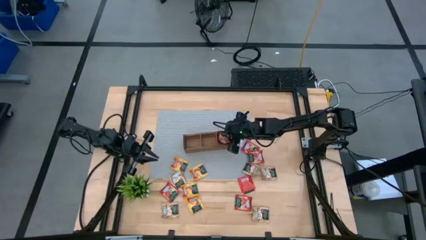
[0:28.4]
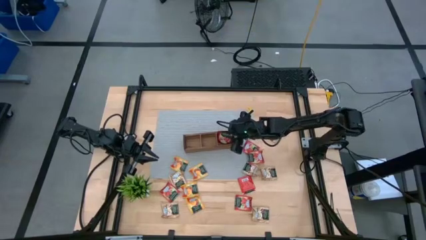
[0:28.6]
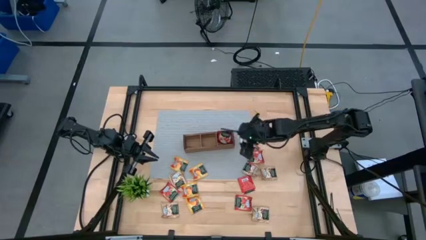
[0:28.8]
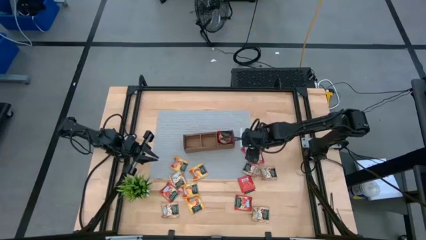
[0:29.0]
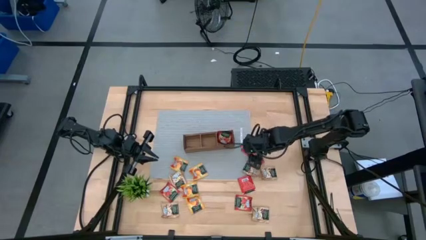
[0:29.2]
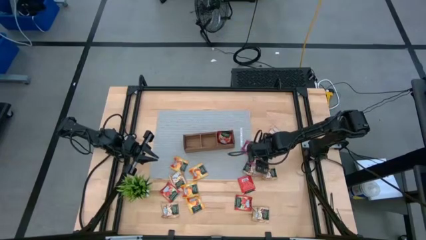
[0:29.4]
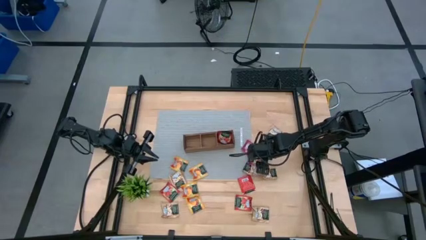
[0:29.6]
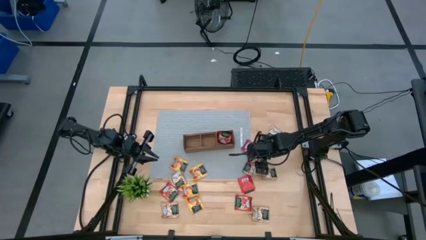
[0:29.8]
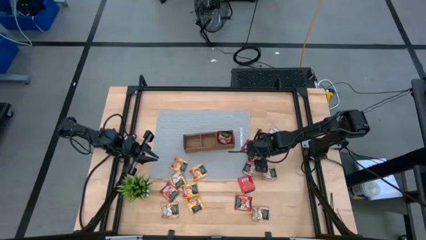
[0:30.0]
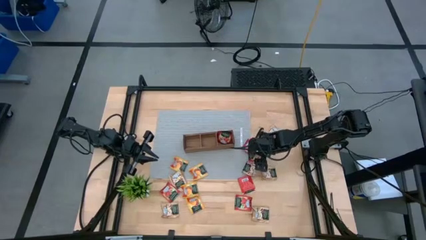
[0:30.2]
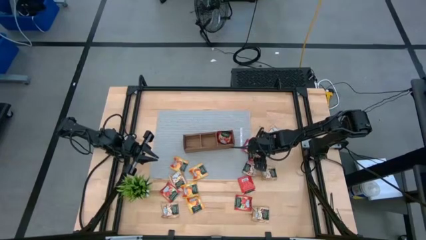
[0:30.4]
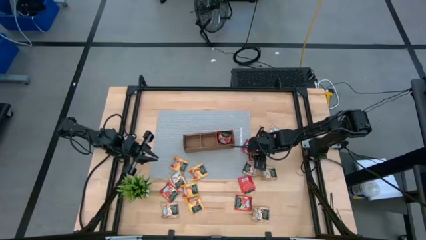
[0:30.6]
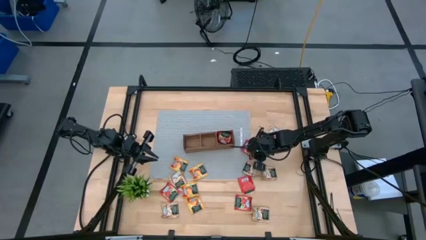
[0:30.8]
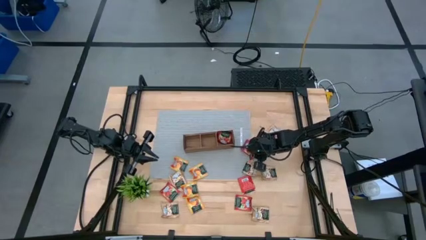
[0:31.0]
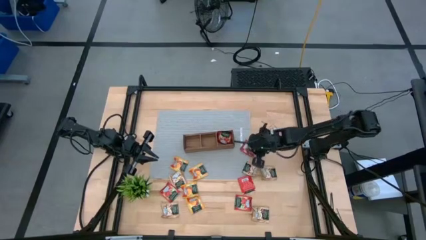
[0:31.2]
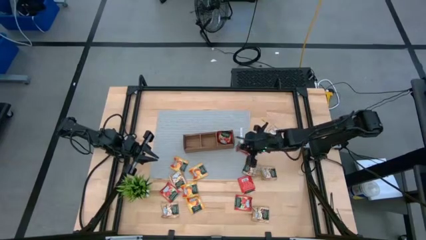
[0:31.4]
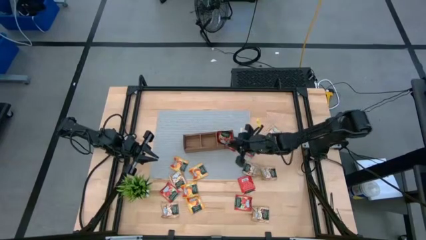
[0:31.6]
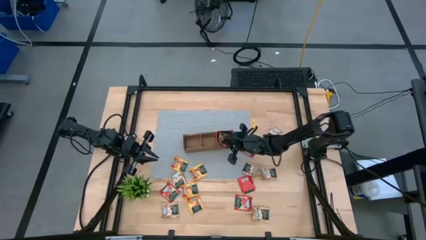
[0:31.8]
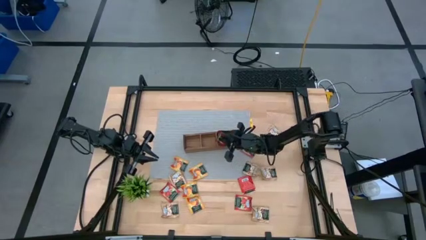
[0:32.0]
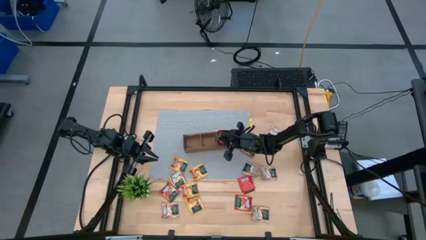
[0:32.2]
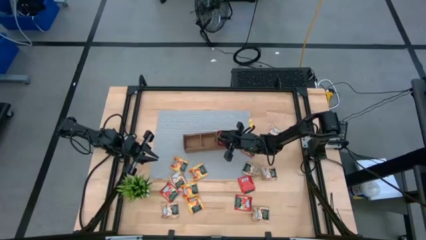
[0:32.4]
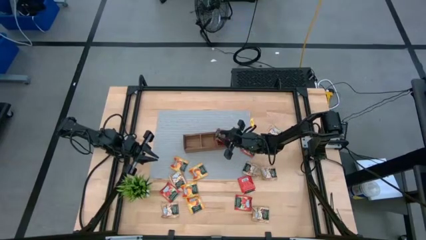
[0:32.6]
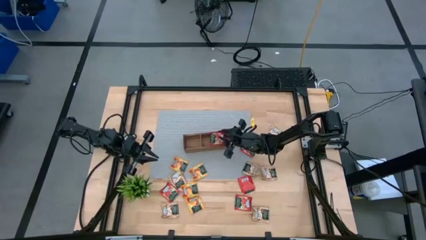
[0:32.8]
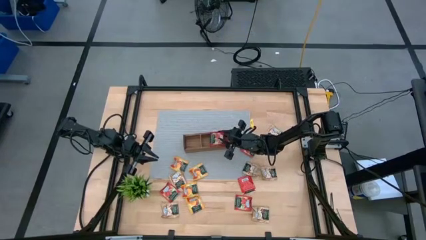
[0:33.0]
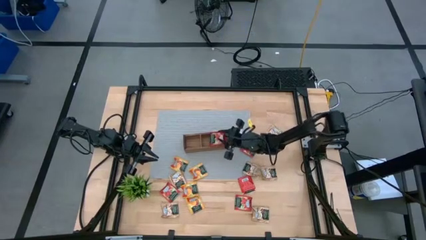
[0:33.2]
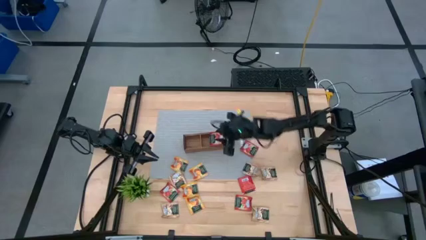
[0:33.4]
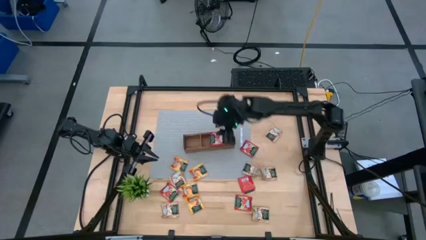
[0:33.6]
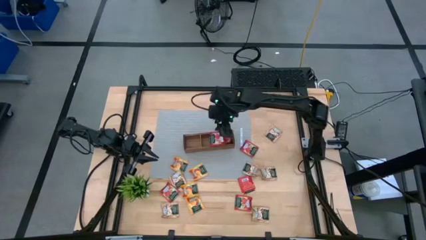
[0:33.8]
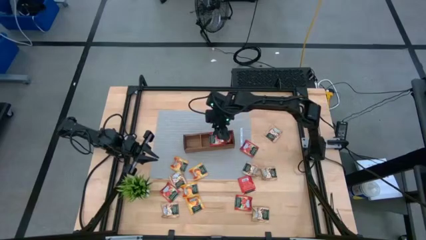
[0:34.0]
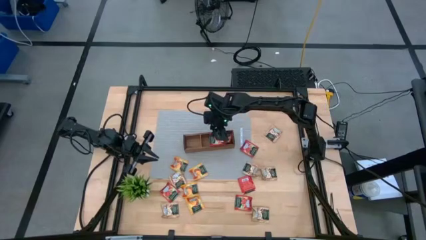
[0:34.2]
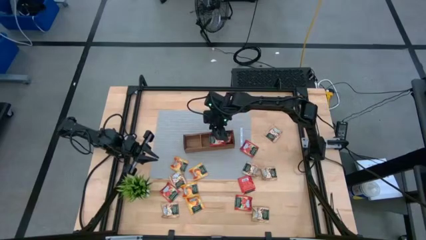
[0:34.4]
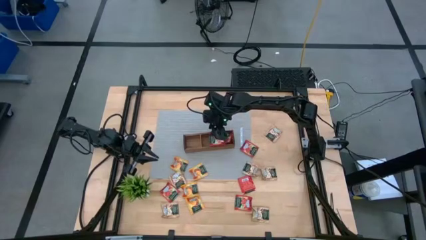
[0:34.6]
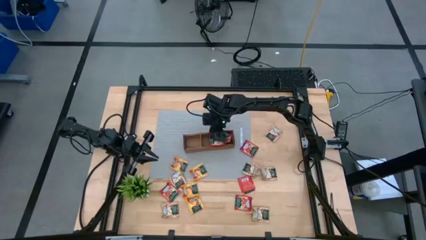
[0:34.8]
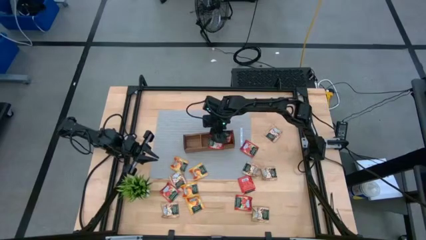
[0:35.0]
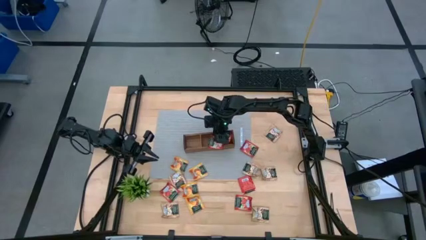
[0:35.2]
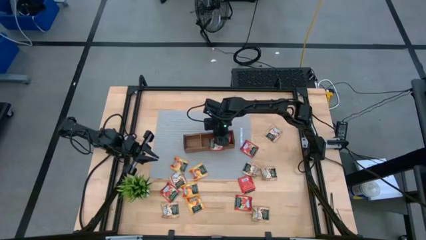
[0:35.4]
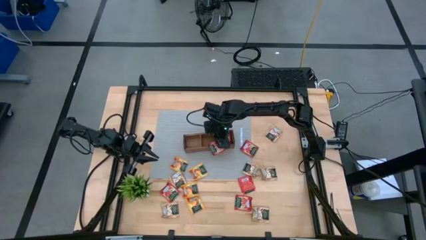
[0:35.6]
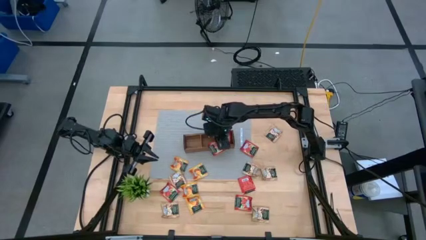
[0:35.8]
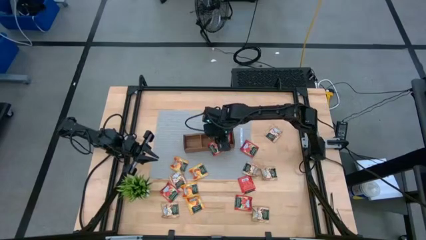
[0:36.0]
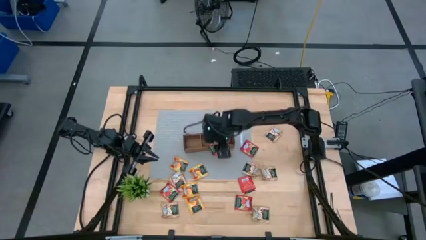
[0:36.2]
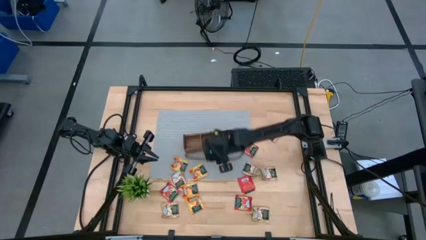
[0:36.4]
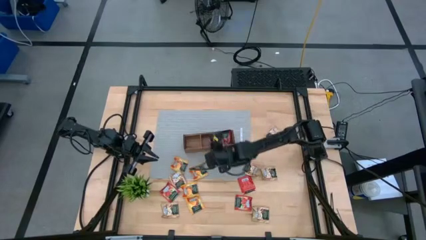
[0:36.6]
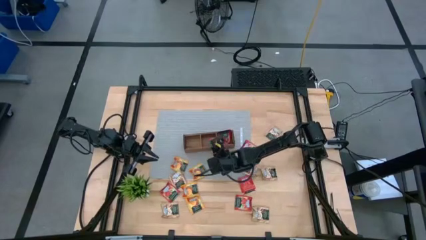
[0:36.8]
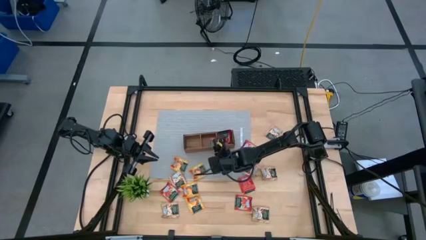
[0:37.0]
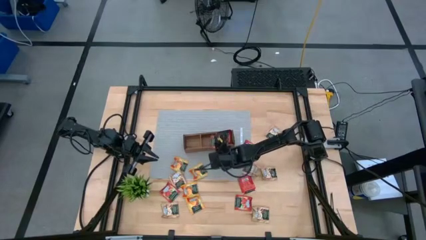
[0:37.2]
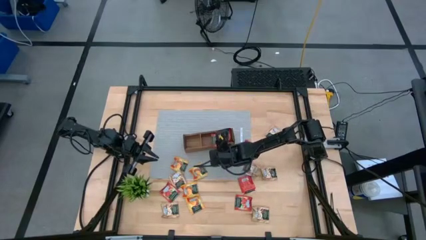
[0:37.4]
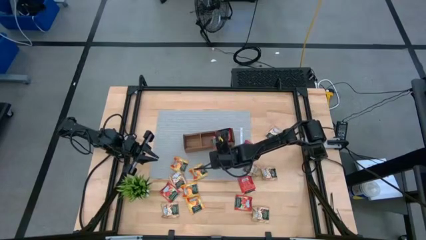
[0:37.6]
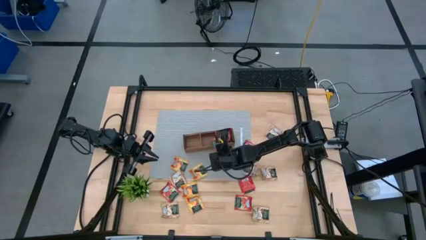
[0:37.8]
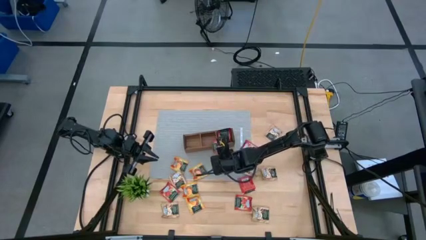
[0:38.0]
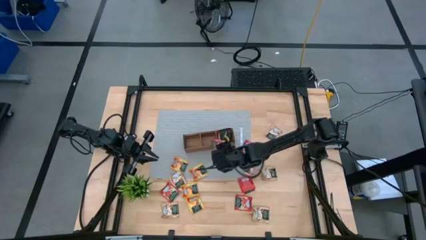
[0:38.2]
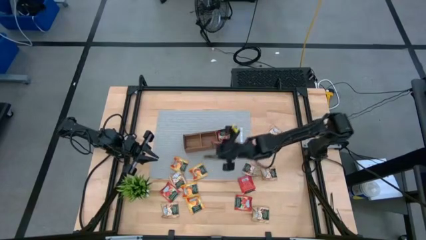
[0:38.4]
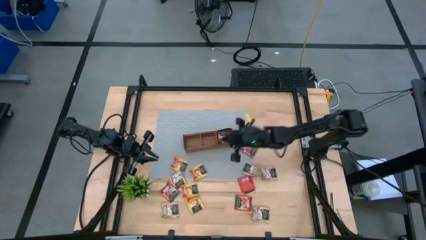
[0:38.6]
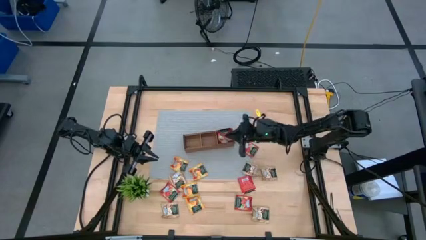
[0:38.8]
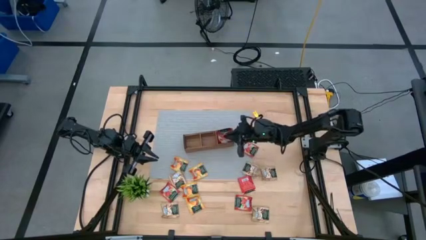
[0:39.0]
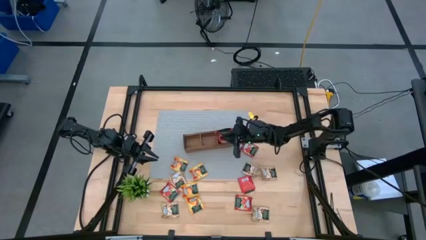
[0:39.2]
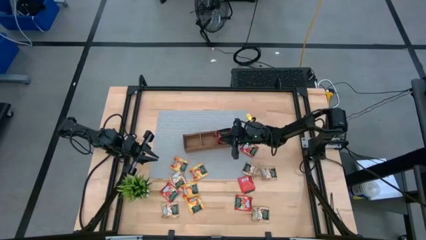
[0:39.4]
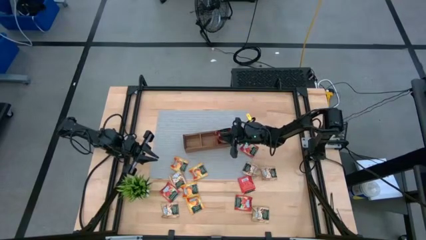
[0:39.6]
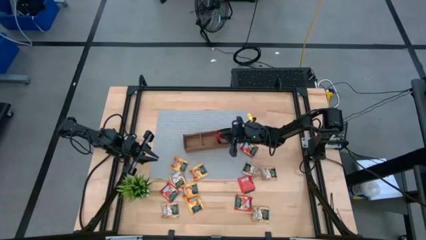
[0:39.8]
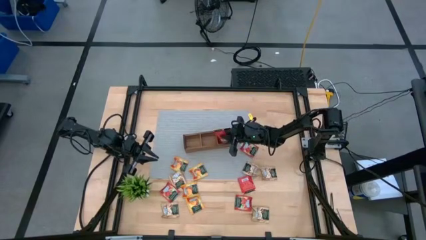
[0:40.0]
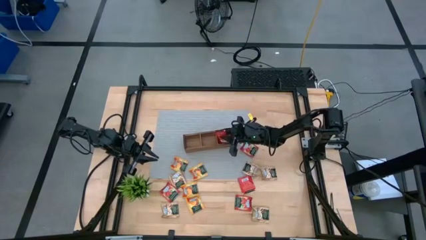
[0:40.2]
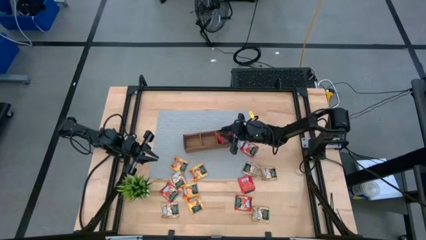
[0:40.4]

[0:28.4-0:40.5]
Task: Pick & Place Tea
Put the red tea bag into the wooden organizer

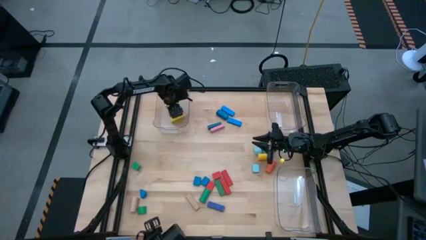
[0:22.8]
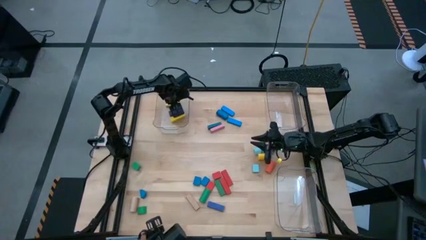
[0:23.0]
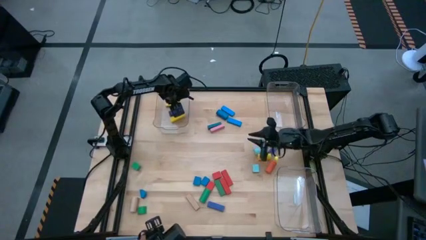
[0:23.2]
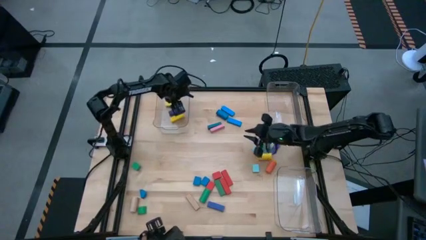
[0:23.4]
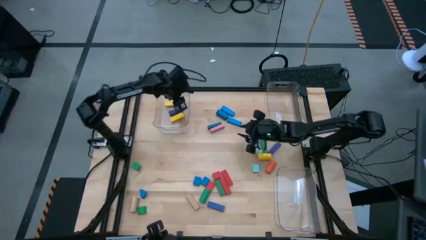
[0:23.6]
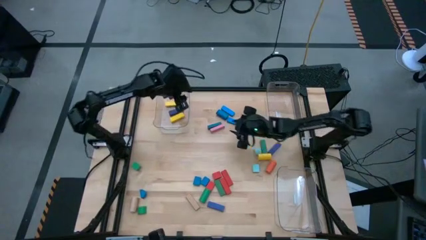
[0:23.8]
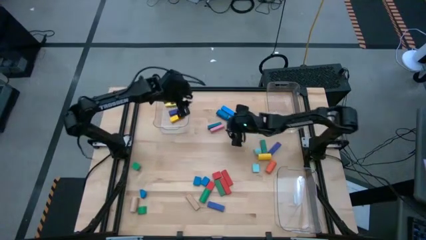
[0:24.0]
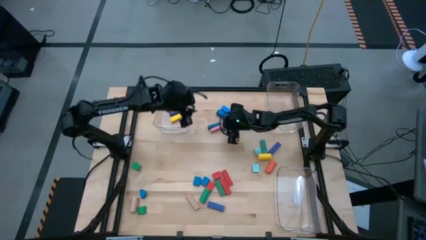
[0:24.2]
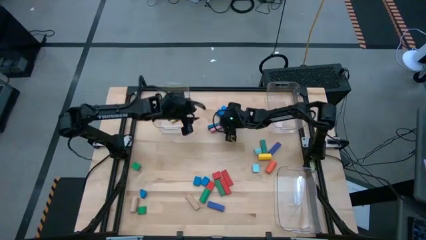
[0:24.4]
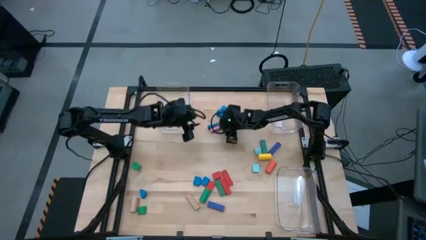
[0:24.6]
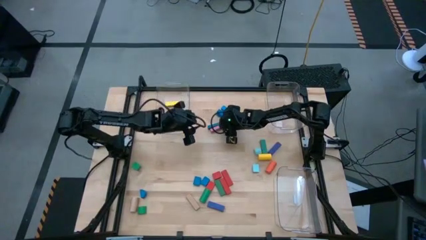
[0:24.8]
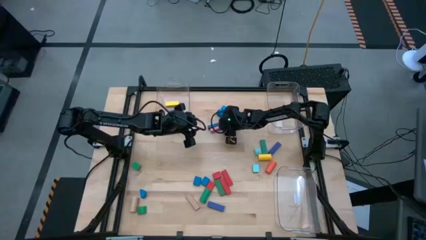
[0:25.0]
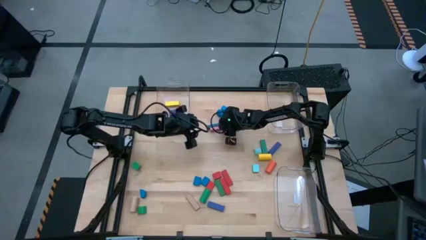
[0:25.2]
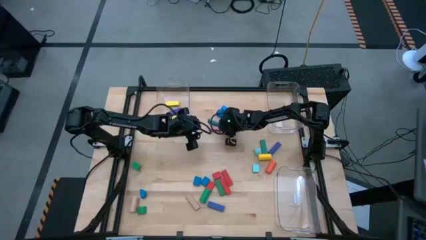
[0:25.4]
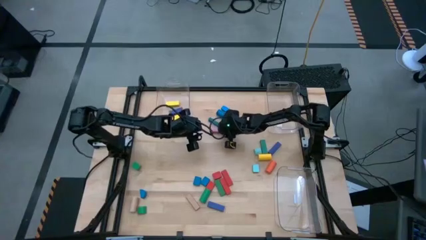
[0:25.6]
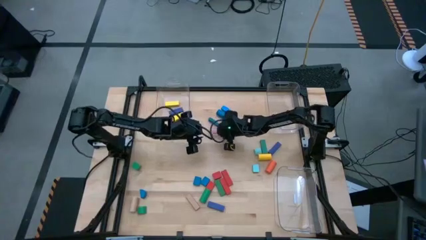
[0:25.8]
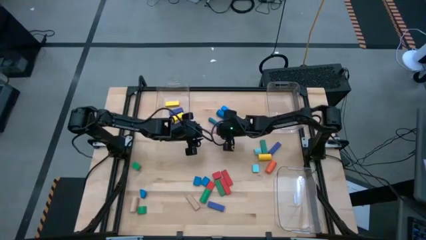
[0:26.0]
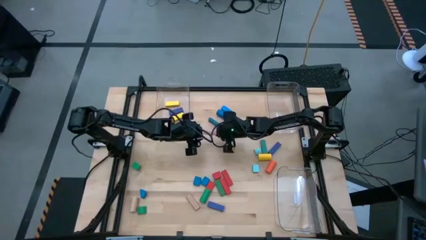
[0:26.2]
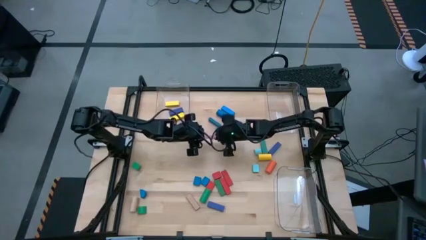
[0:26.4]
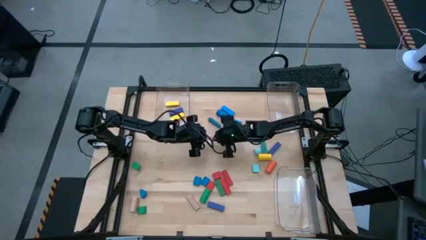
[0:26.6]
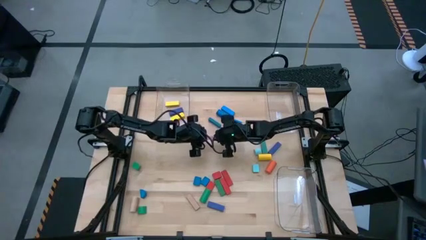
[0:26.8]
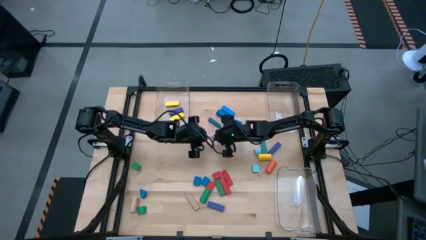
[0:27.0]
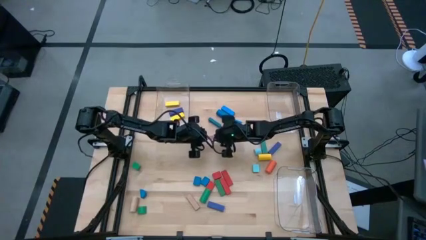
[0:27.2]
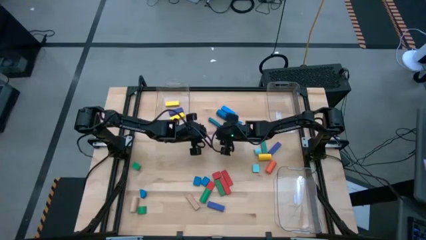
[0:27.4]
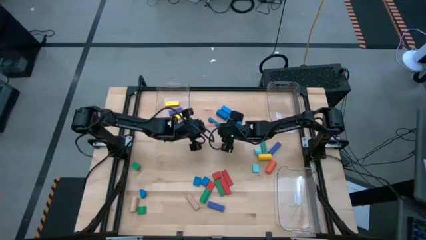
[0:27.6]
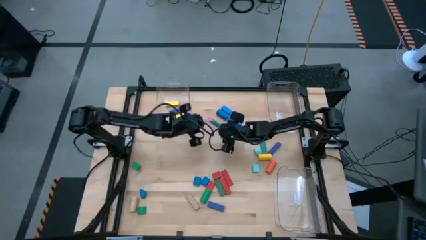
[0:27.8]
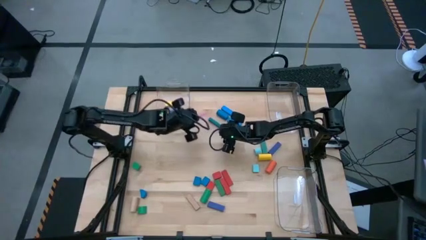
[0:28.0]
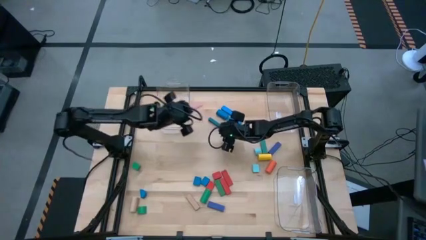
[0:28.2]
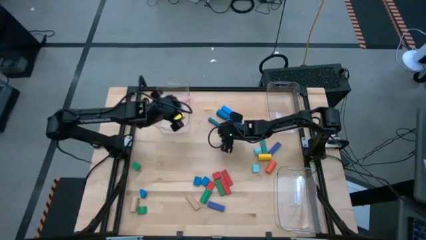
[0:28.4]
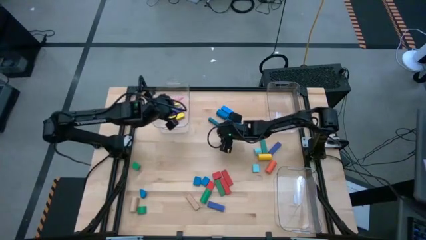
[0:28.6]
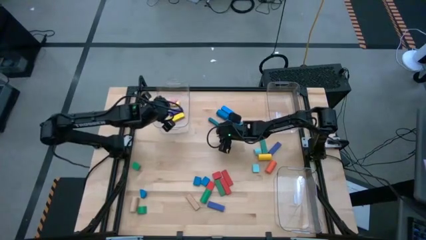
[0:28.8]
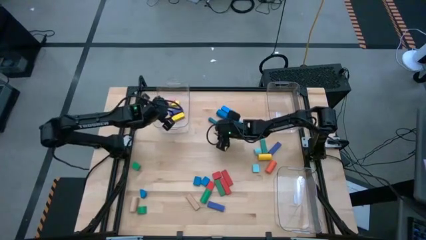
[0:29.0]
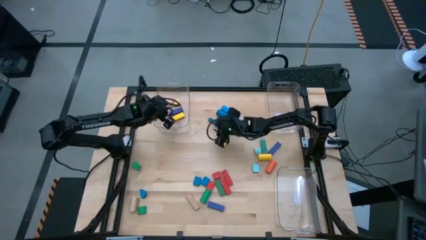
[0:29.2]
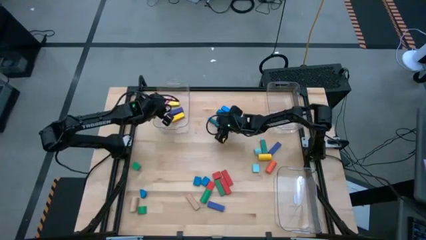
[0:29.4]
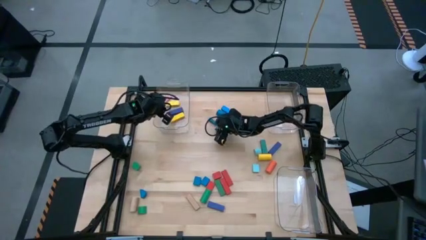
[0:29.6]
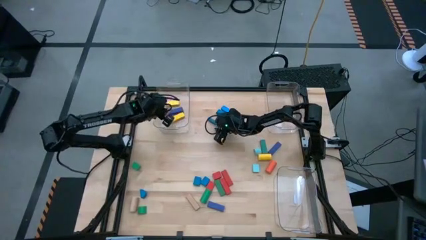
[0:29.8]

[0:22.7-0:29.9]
Task: Sort blocks by size
Put the pink rectangle block into the top left transparent bin
